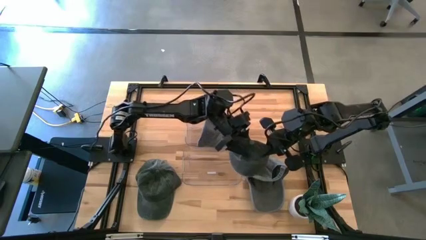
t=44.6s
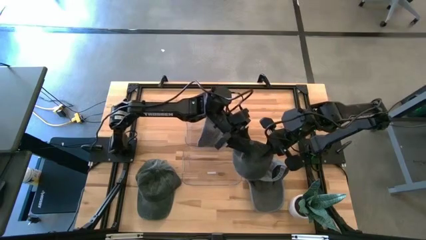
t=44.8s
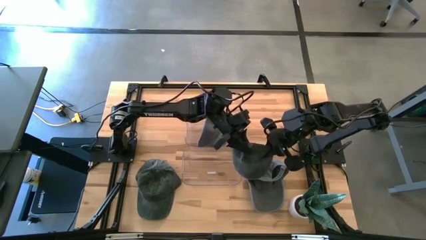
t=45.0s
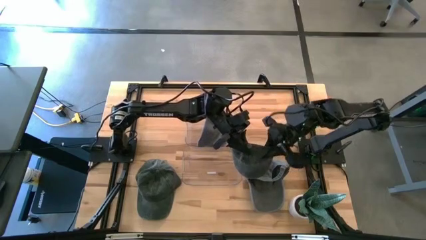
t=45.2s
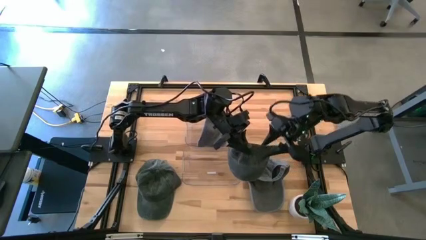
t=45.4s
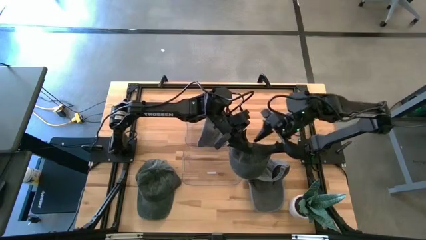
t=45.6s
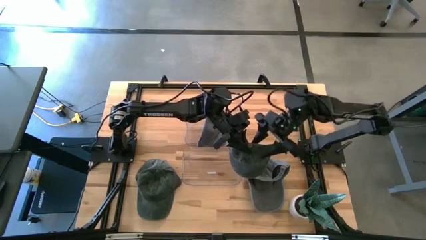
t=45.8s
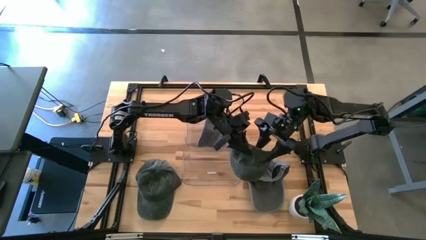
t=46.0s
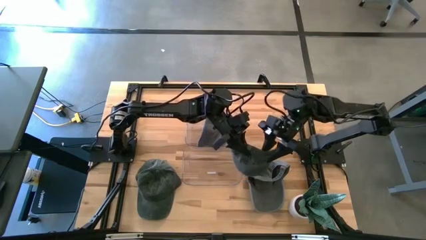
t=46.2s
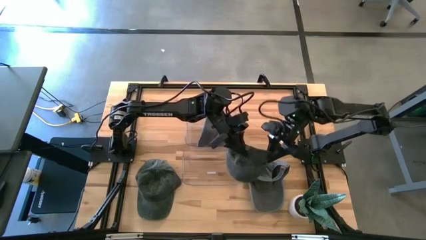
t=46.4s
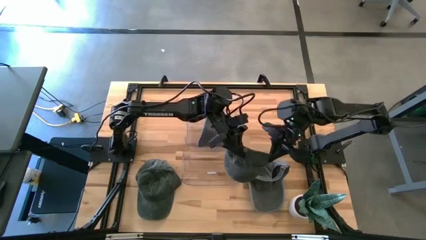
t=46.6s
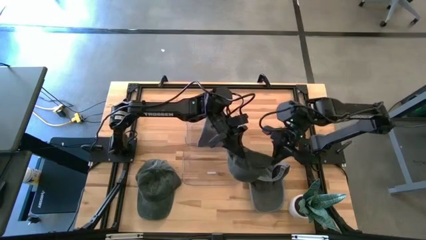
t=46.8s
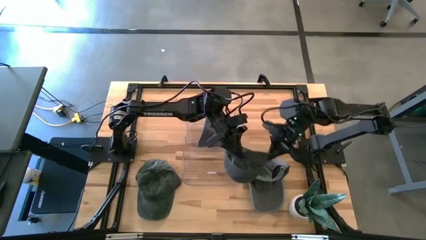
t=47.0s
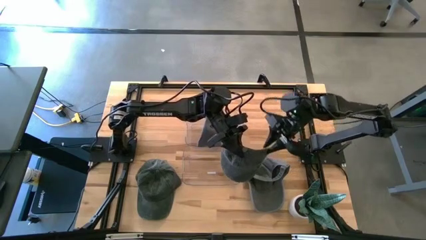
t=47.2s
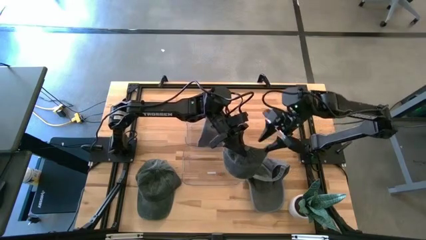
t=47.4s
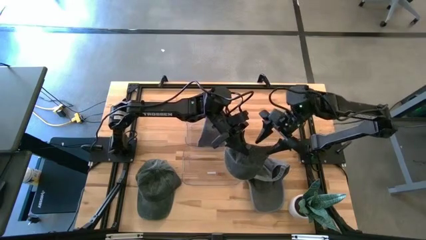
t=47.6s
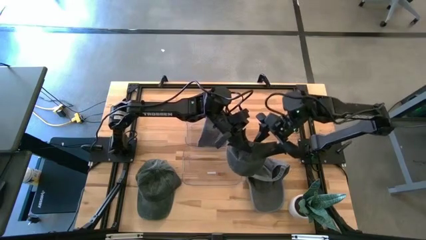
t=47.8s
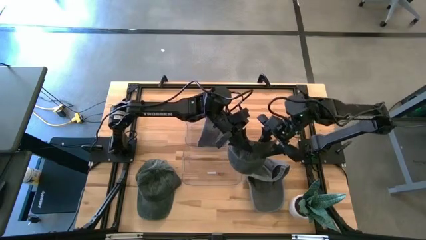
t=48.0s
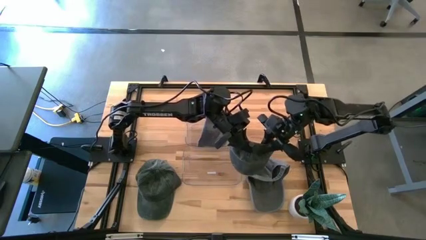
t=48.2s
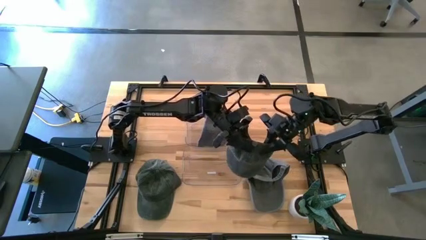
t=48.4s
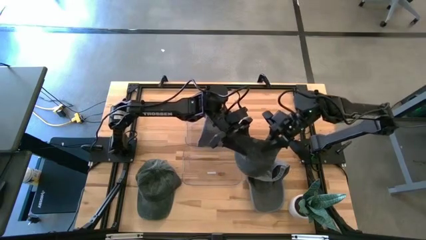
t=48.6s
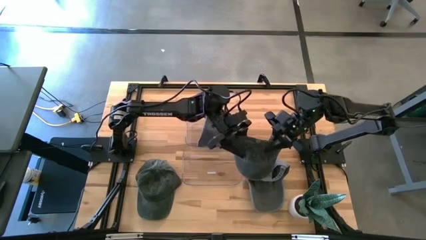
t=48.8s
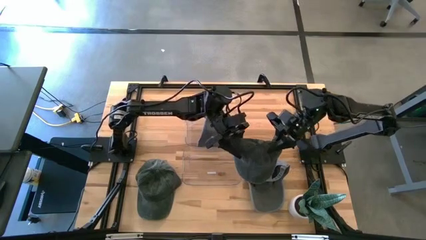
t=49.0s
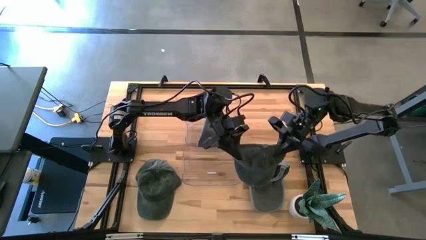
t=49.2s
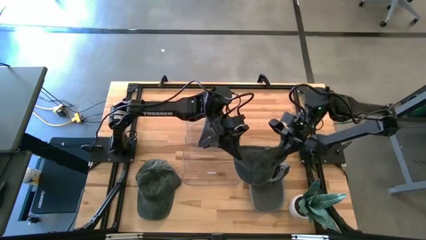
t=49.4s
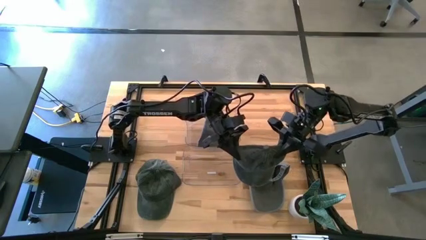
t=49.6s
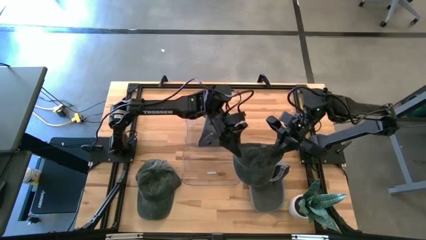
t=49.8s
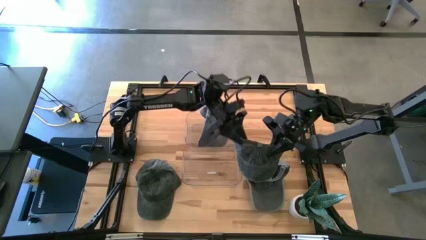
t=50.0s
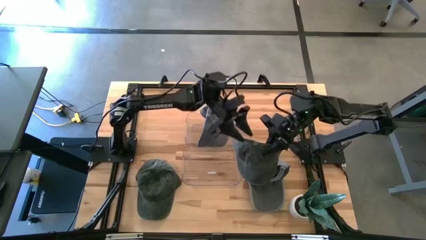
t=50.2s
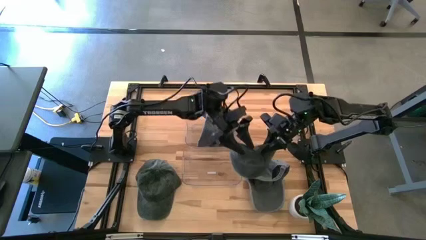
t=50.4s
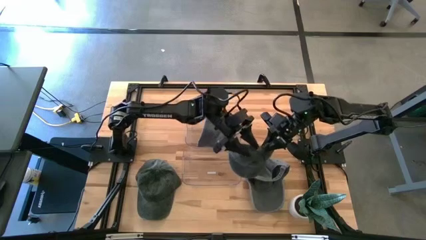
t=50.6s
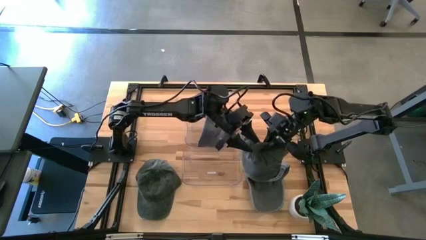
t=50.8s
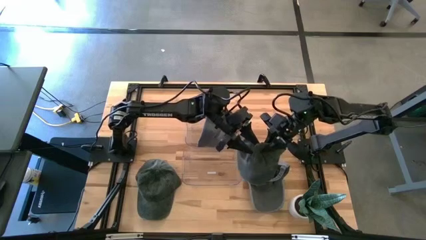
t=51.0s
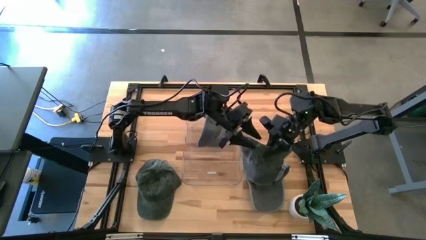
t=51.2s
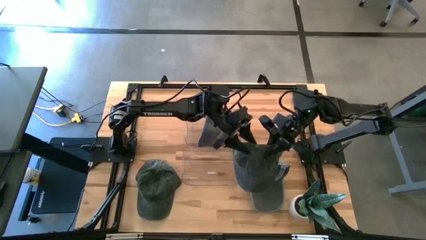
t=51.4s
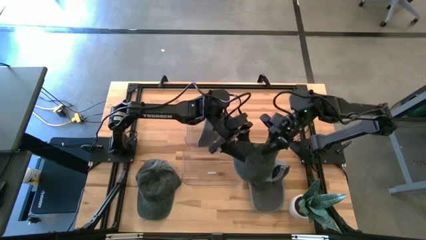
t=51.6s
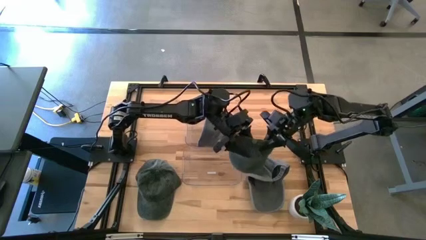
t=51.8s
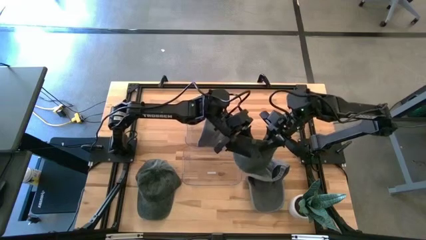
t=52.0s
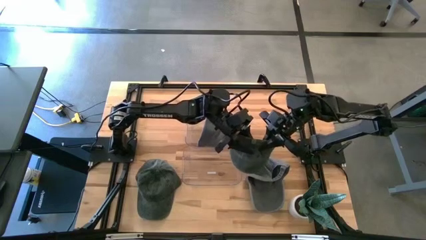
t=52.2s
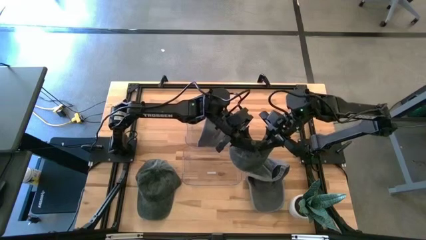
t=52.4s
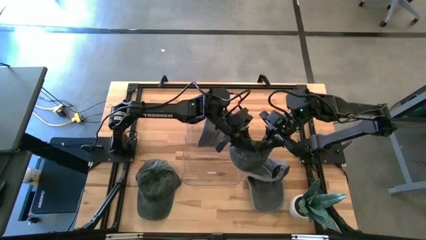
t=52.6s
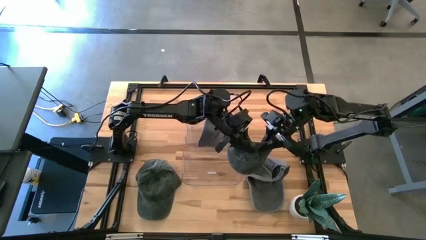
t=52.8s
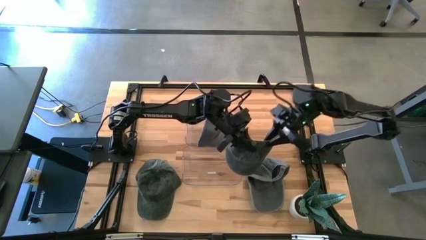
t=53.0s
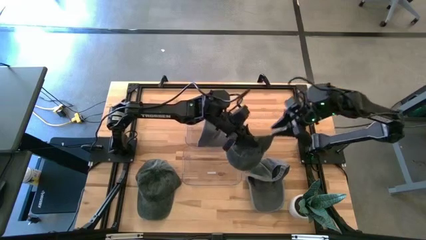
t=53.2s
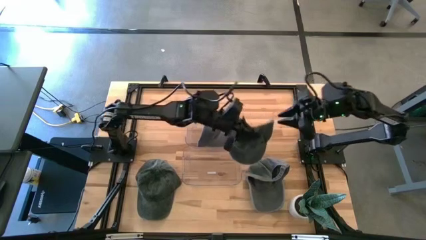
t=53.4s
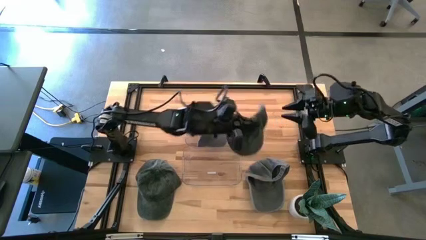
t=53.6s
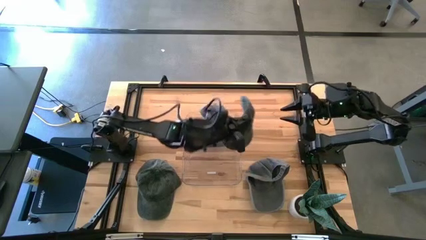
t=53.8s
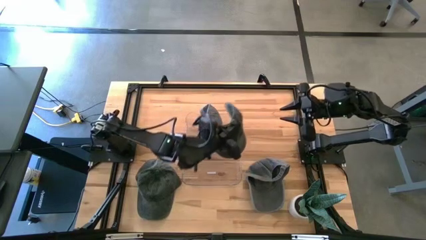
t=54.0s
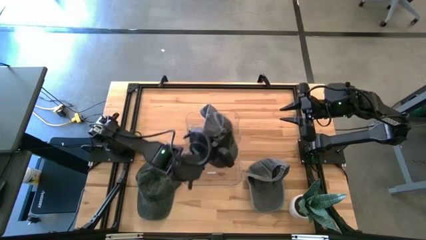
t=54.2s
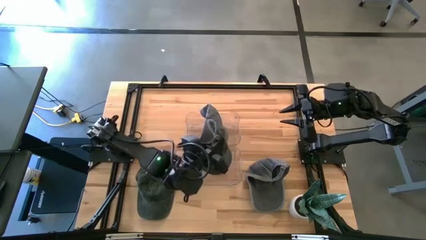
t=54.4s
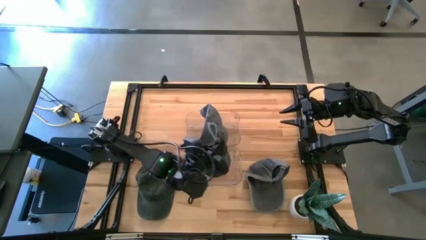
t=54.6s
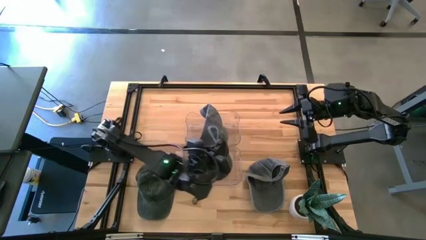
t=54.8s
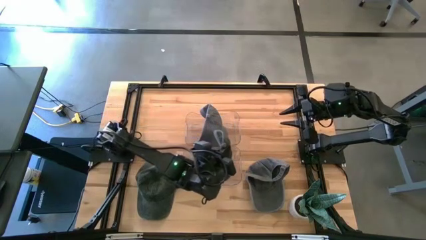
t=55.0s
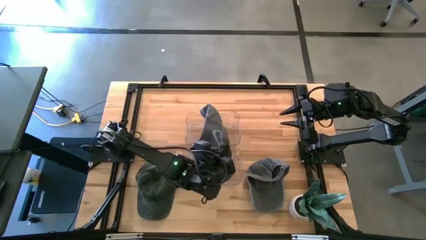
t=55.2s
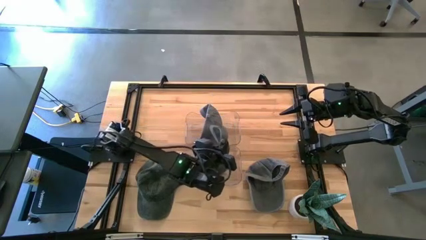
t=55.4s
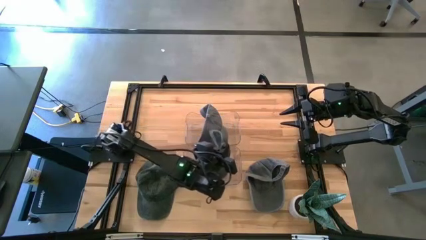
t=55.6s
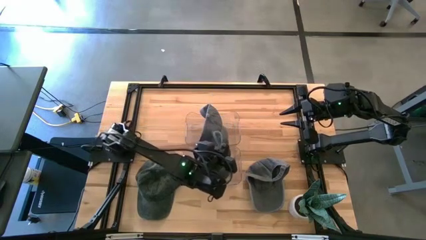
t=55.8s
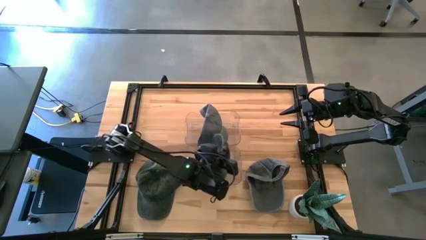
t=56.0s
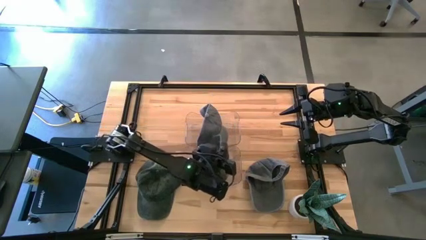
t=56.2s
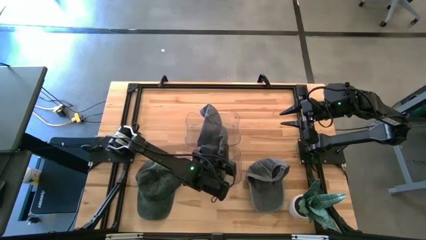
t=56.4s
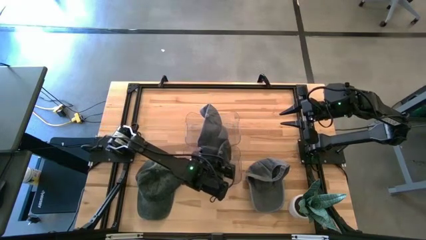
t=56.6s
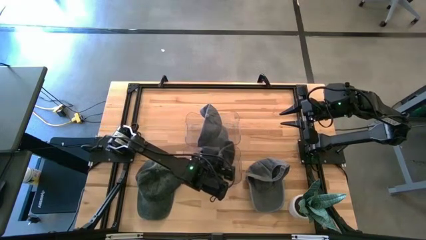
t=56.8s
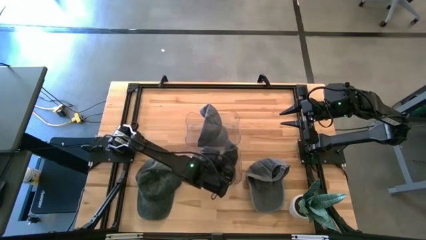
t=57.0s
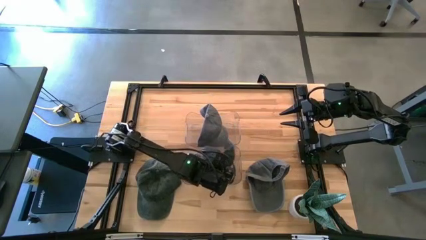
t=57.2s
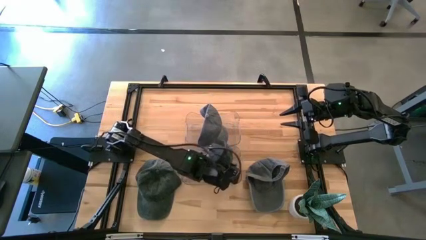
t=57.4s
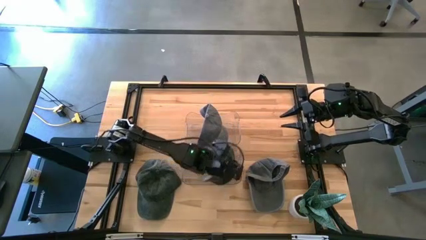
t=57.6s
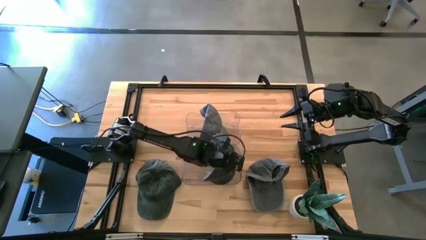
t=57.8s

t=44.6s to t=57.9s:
Task: Pick & Place hat
Put the top black cap into the bottom transparent bin

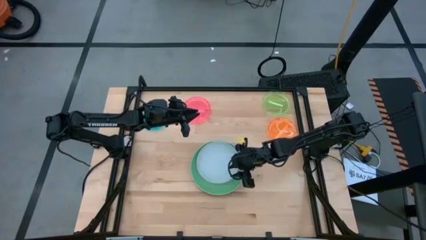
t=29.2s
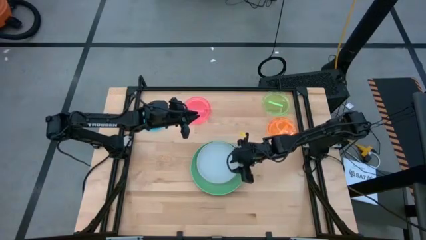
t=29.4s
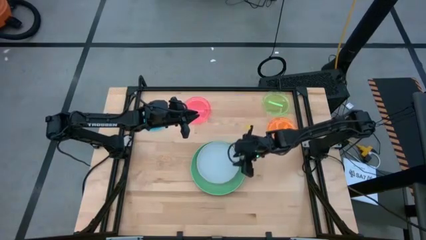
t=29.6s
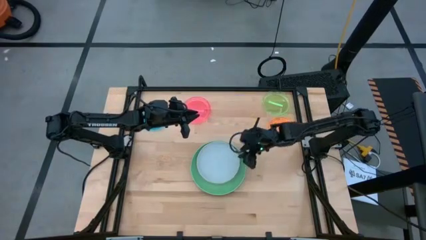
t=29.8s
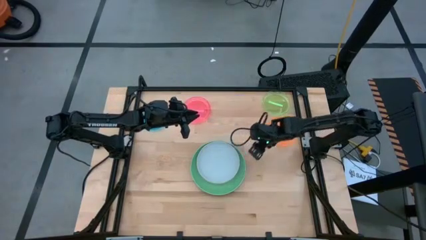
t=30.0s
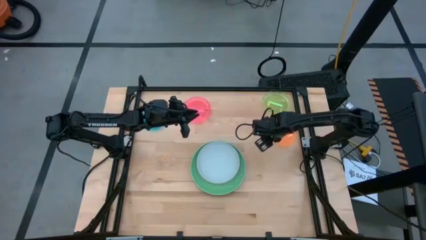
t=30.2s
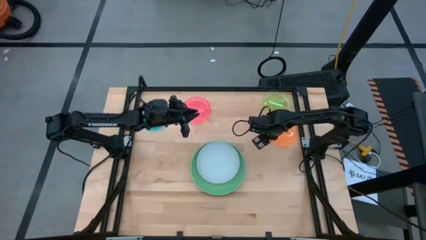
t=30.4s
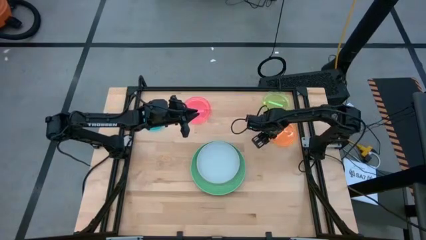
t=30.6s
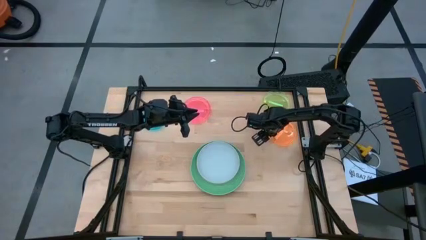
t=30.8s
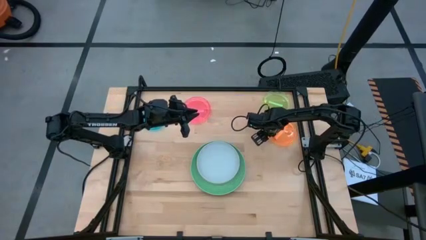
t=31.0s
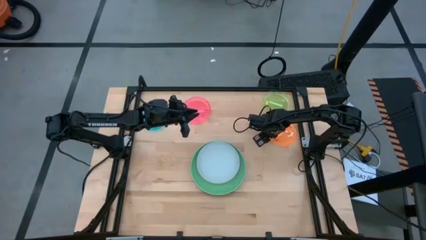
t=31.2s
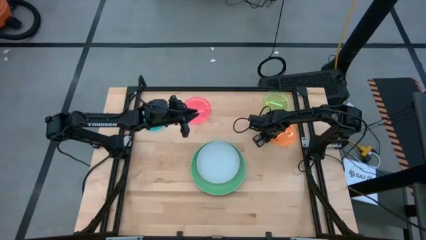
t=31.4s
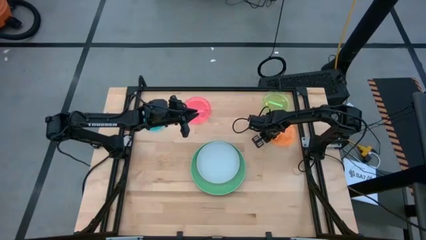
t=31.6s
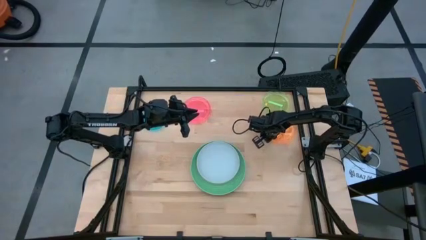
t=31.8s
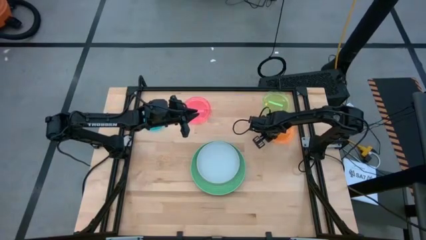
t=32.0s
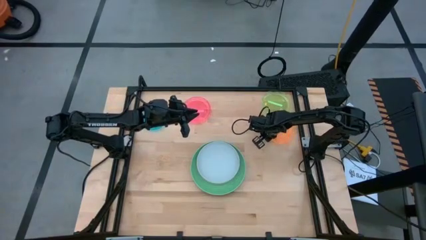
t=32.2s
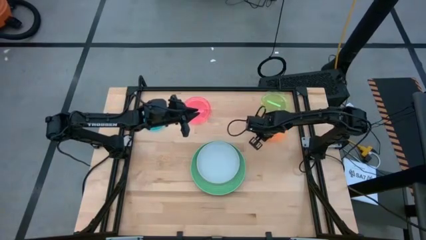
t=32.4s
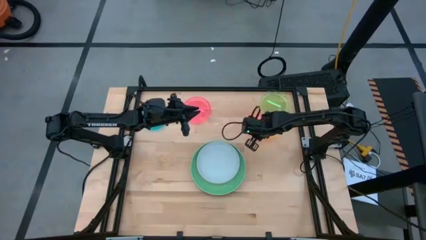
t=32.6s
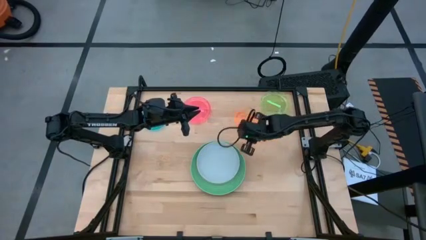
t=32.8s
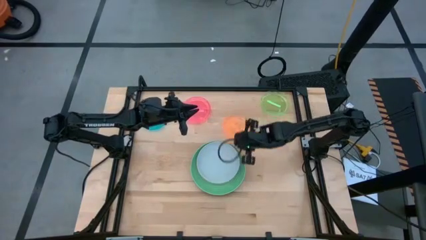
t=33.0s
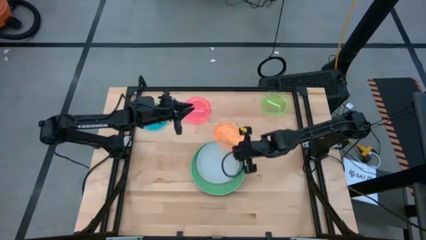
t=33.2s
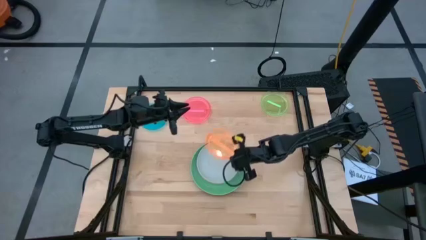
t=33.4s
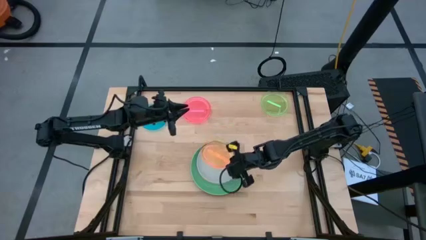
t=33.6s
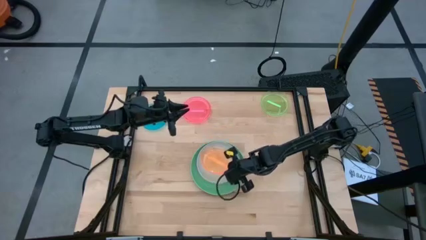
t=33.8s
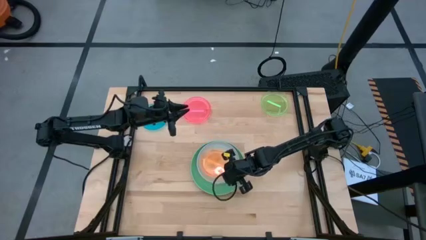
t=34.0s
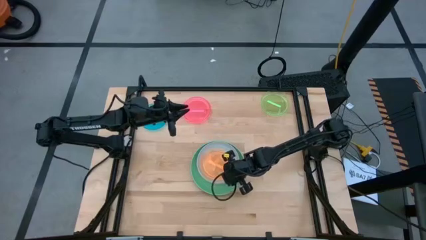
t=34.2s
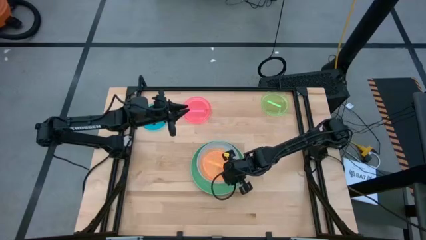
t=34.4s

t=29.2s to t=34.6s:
Task: Stack plastic plates
Stack the orange transparent plate on the blue plate
